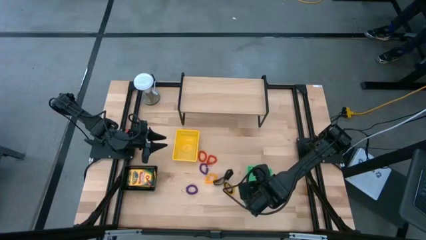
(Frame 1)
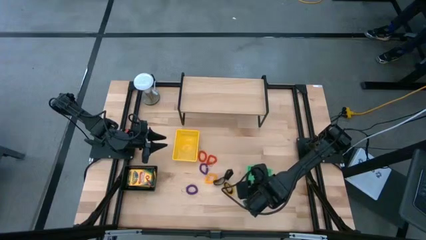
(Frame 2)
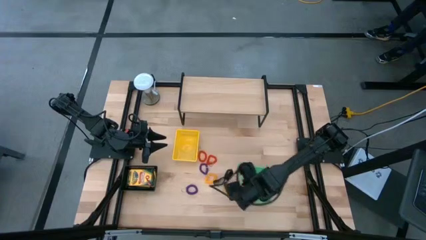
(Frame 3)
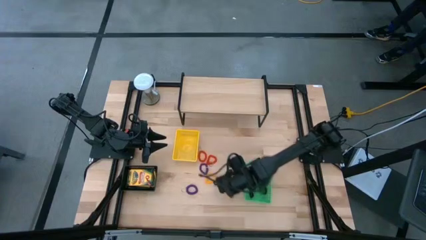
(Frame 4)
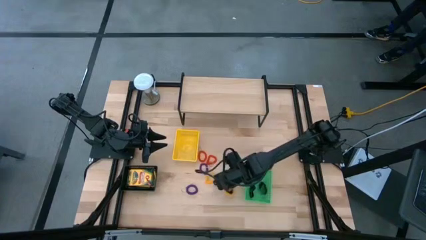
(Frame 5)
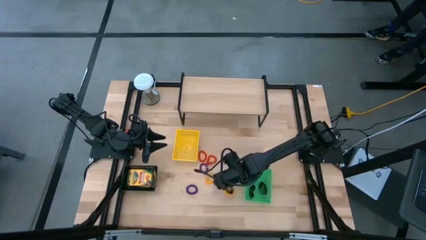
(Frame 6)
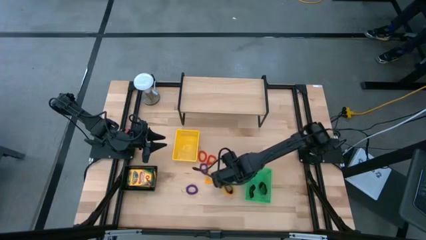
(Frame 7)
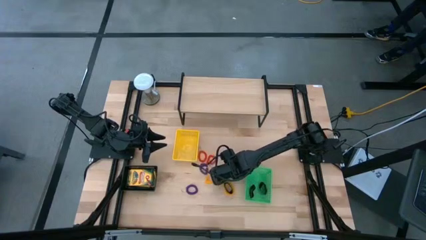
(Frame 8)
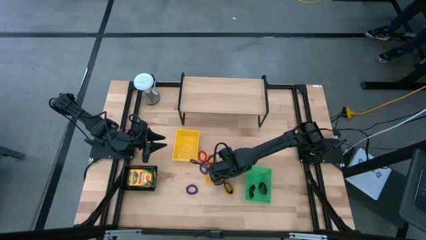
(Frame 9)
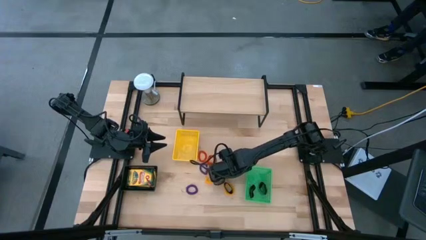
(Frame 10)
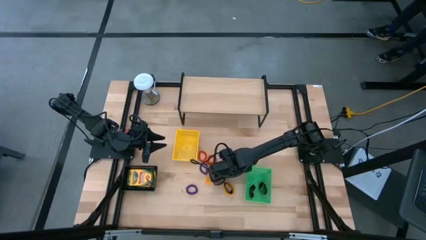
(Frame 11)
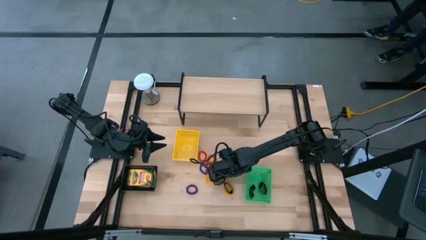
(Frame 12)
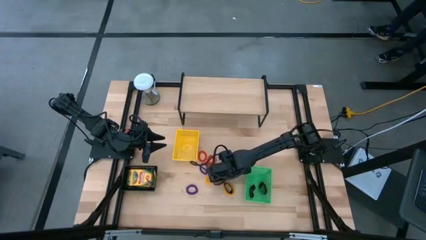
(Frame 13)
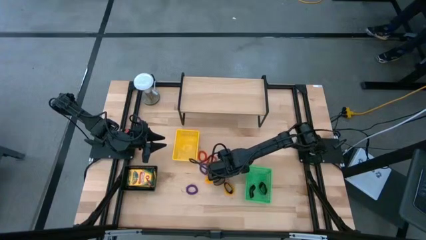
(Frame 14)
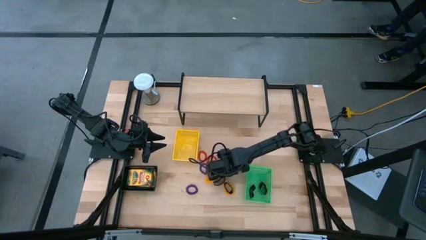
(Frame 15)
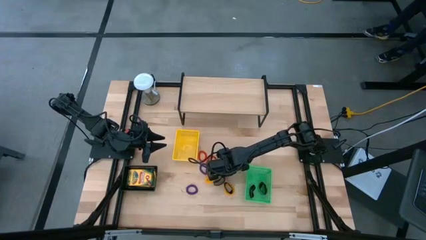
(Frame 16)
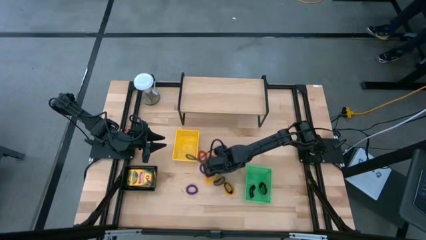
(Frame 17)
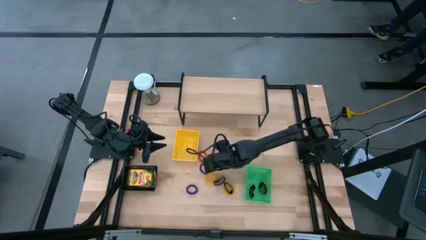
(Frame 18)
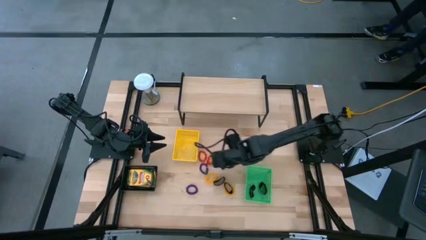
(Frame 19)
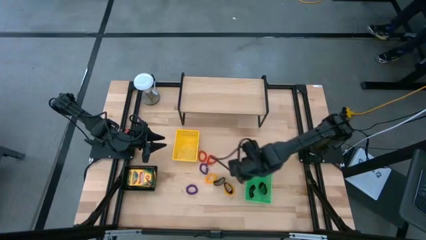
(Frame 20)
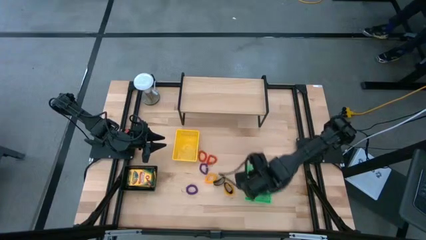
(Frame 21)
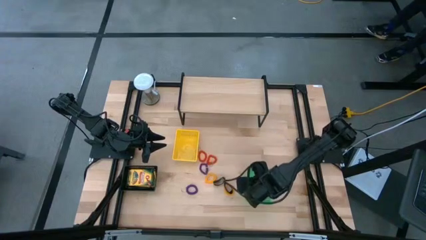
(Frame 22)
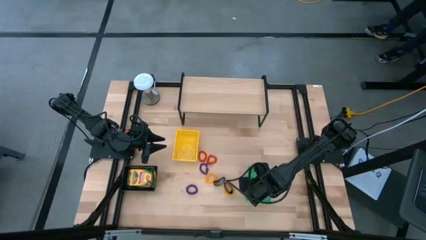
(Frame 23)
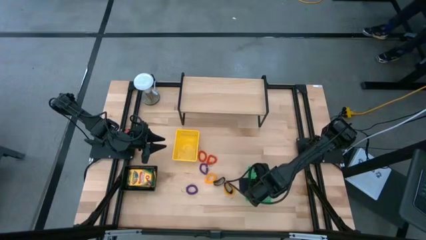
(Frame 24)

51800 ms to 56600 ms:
Task: Pick & Place Office Desk Supplies
Put the black rubber band into the green bin

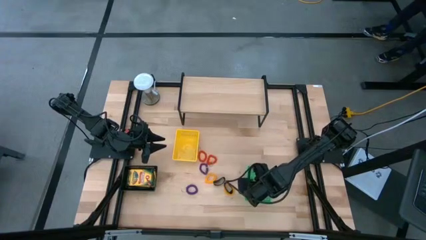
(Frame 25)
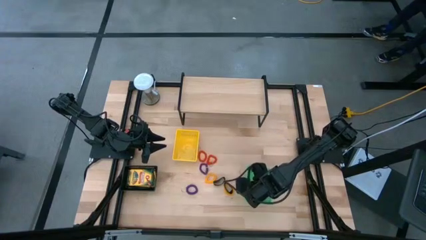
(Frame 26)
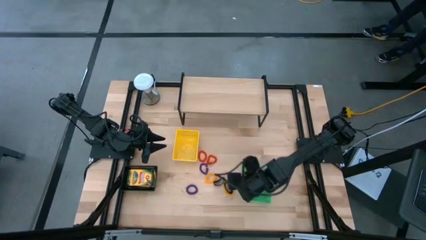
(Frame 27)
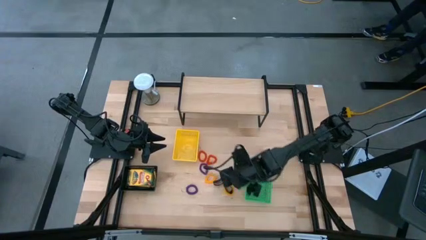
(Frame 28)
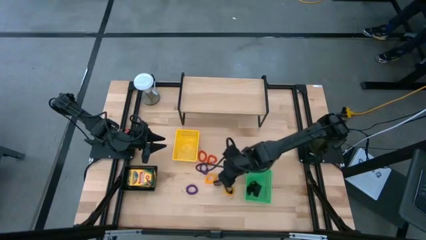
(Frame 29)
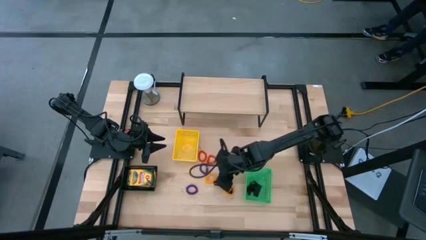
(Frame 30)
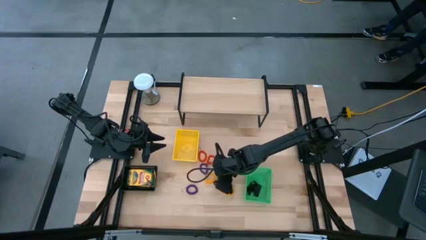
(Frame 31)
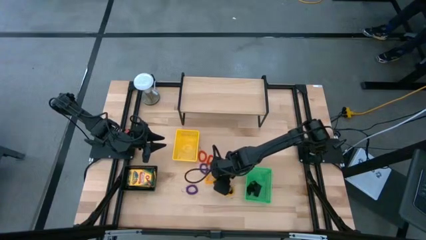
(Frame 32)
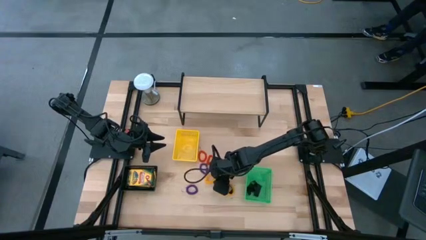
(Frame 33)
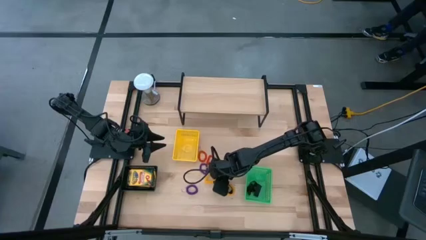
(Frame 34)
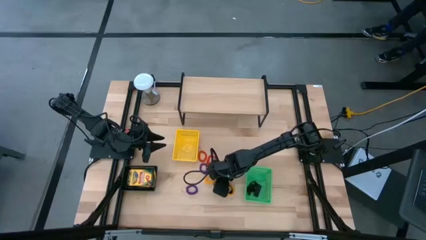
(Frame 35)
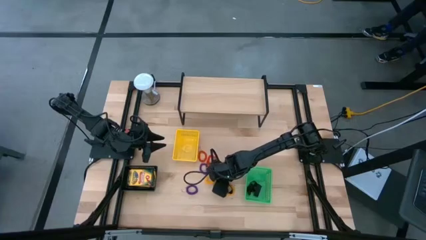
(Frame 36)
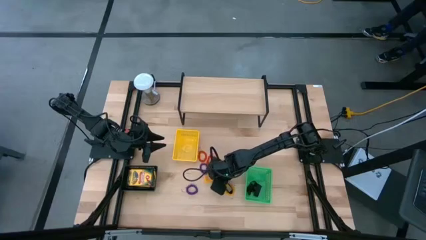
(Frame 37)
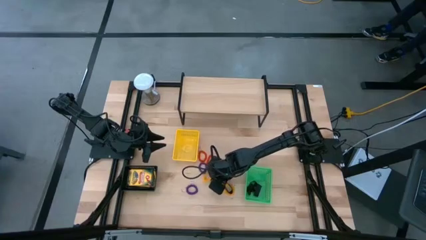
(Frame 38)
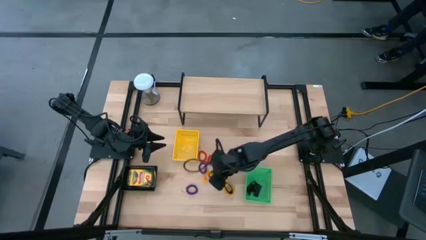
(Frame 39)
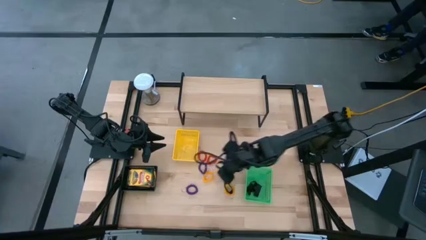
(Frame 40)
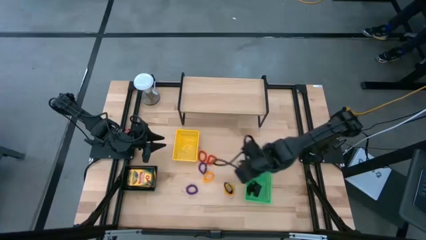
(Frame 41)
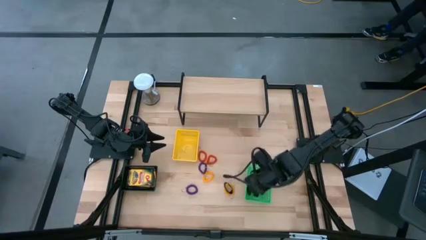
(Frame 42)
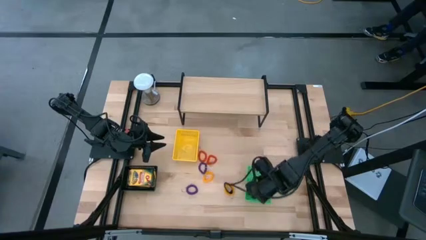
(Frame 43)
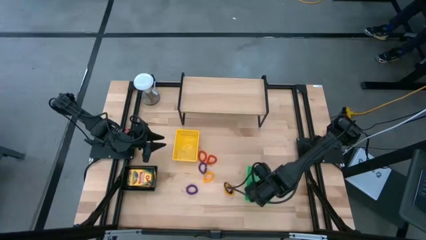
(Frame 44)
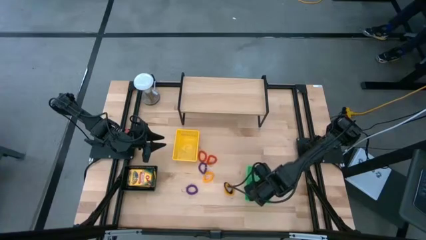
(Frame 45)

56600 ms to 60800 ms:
Put the black rubber band into the green bin

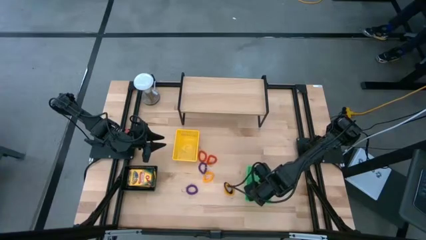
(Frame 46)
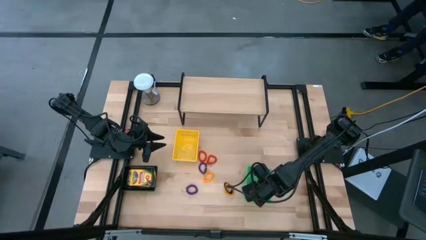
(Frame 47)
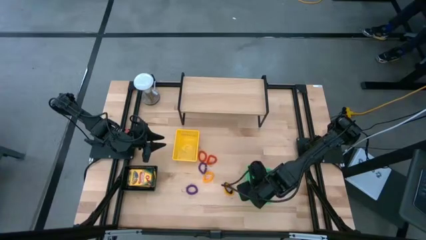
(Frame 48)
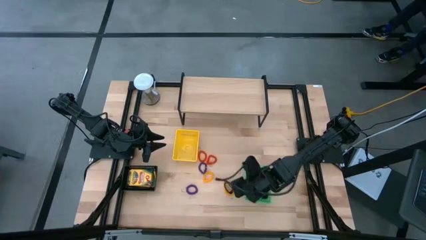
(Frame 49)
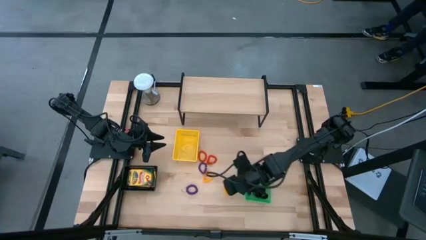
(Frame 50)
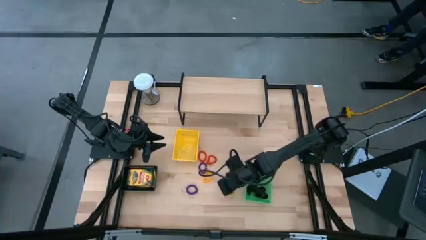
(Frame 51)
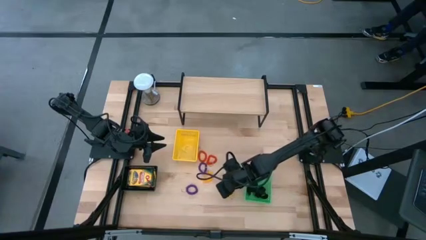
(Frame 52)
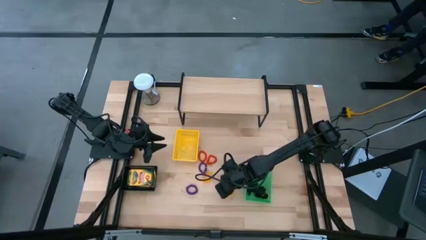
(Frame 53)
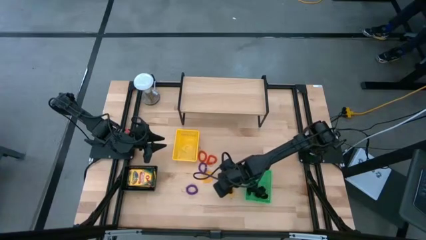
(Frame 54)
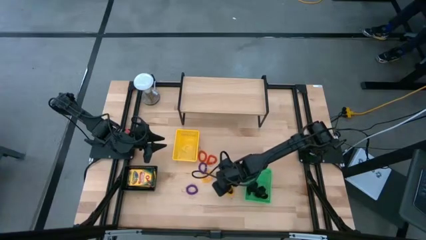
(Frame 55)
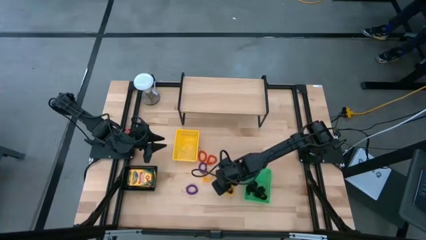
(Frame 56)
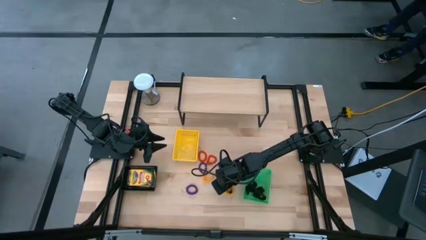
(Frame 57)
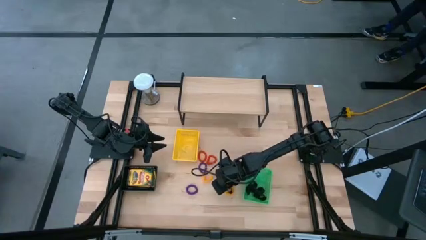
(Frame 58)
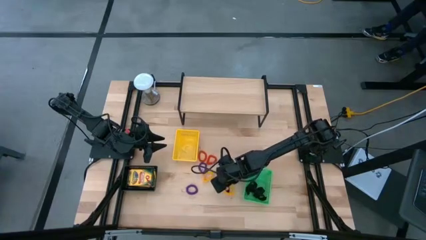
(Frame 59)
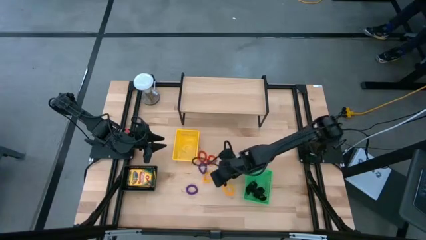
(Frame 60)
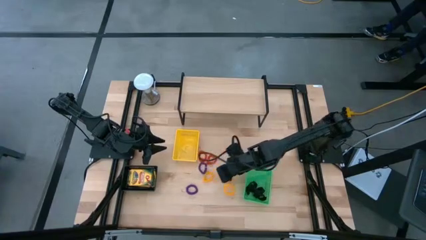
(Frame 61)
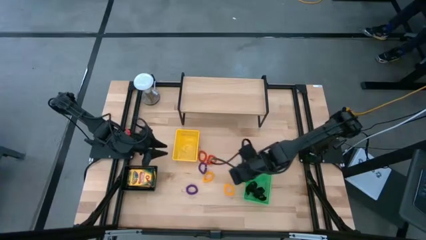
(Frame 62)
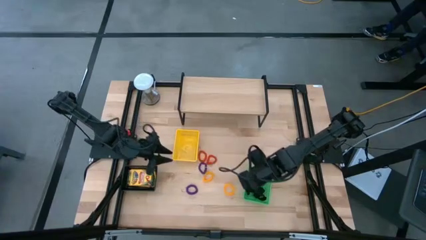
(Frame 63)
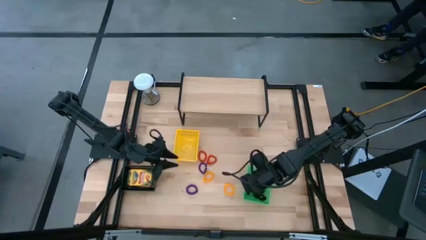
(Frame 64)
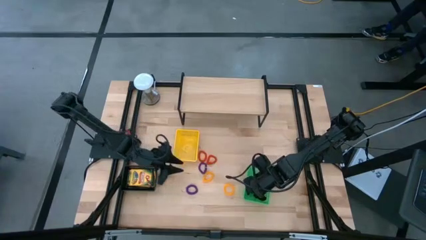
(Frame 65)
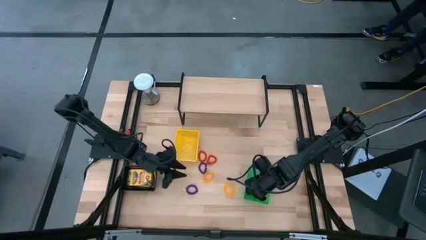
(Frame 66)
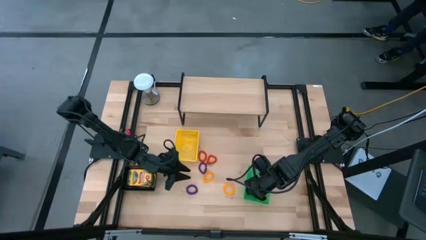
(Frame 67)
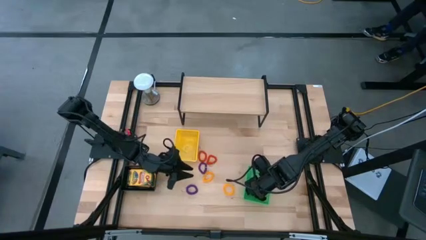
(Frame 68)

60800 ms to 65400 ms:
Put the black rubber band into the green bin

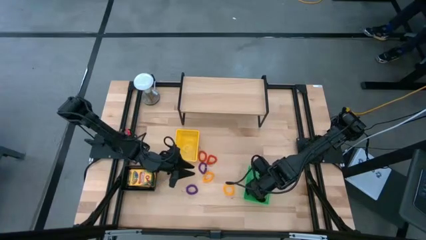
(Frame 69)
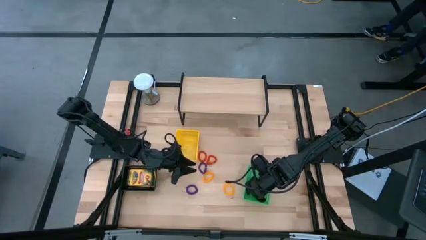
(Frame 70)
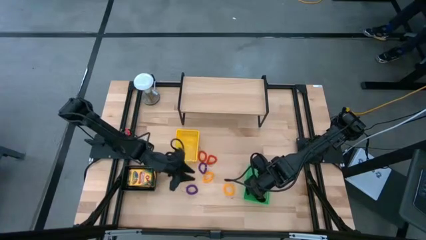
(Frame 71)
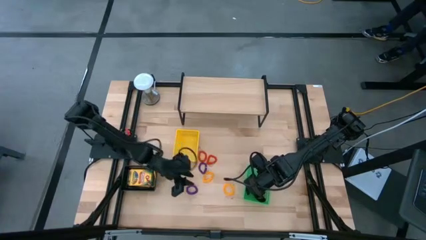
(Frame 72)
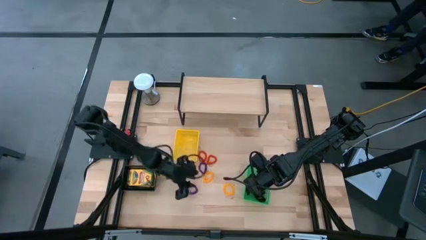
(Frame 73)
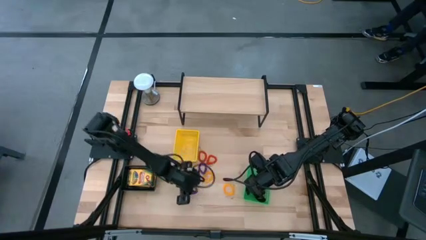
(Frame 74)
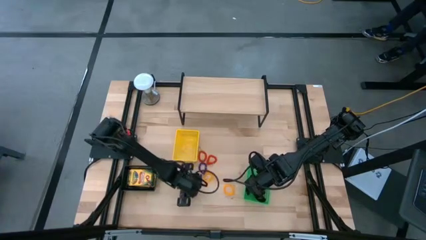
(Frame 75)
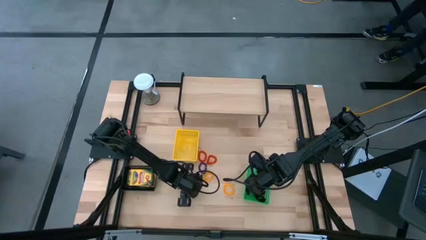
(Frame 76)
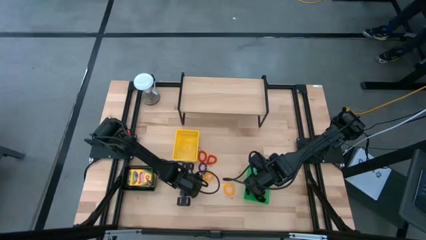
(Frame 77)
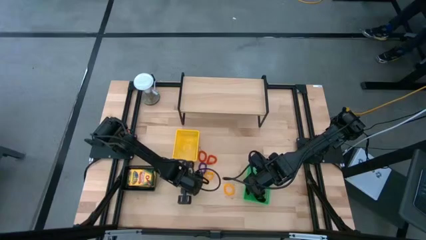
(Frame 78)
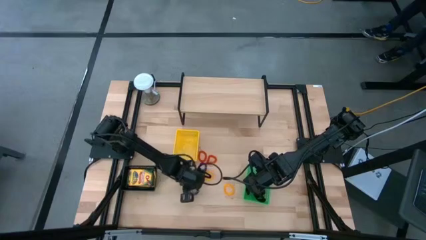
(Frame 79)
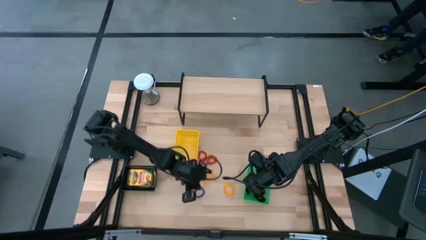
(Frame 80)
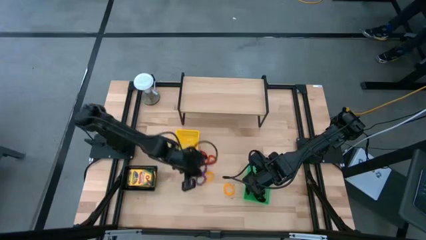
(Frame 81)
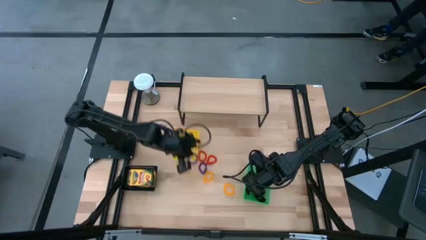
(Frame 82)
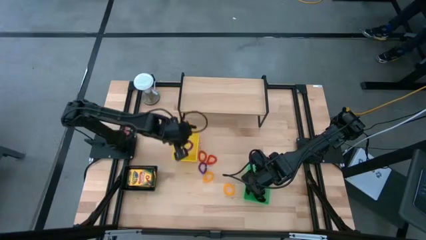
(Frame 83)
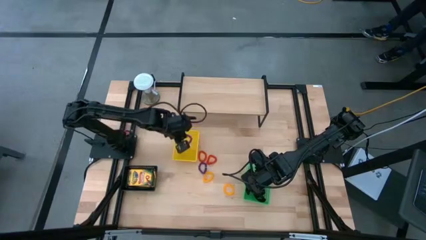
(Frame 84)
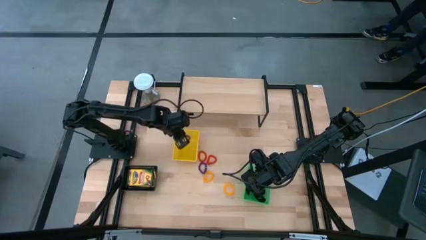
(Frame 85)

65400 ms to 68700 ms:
Put the purple spring keychain into the yellow bin
